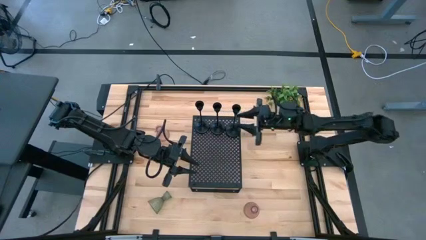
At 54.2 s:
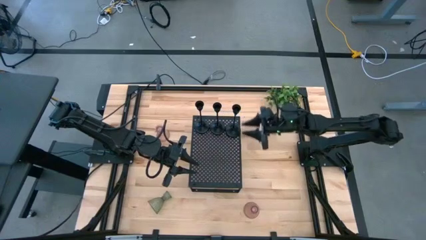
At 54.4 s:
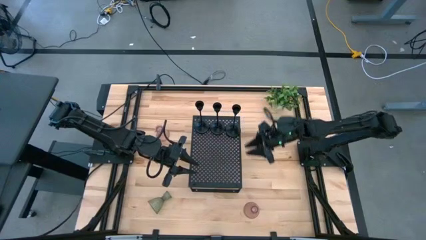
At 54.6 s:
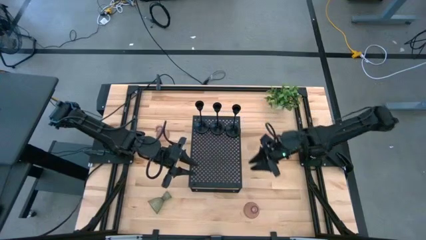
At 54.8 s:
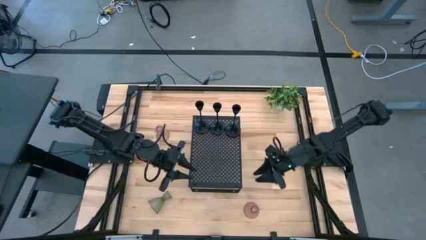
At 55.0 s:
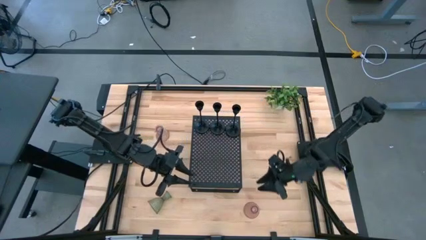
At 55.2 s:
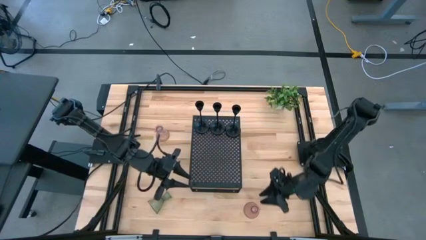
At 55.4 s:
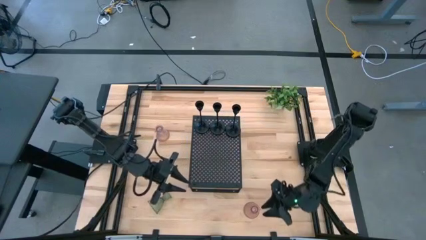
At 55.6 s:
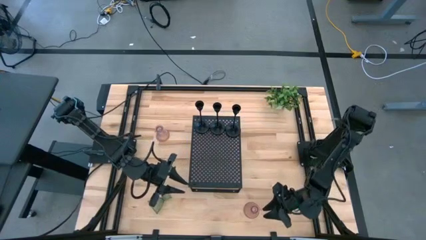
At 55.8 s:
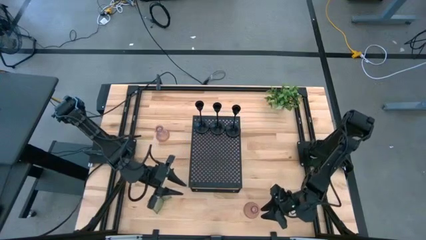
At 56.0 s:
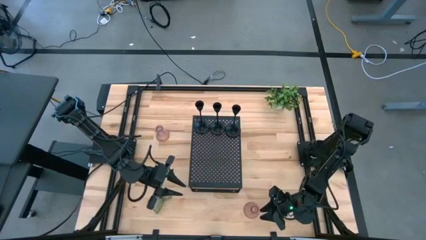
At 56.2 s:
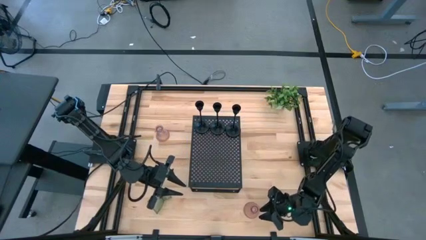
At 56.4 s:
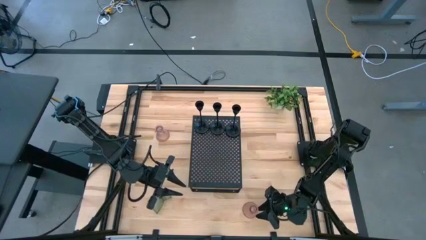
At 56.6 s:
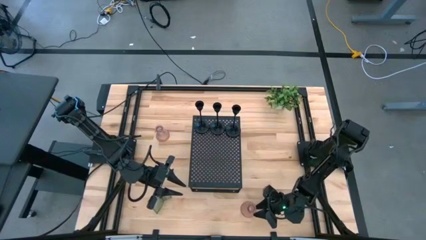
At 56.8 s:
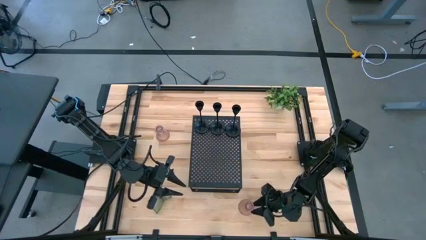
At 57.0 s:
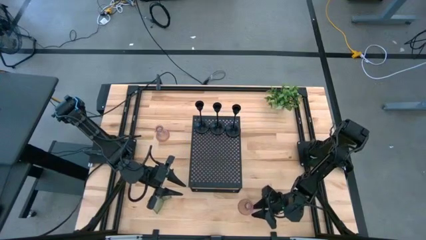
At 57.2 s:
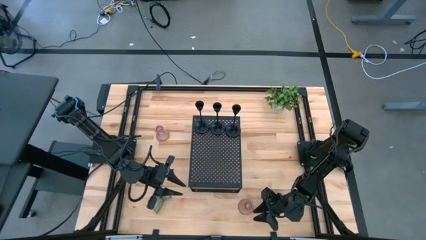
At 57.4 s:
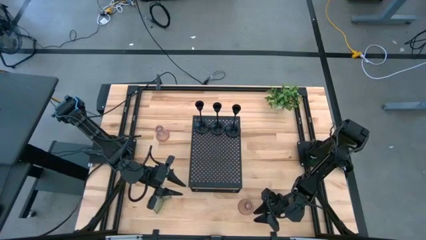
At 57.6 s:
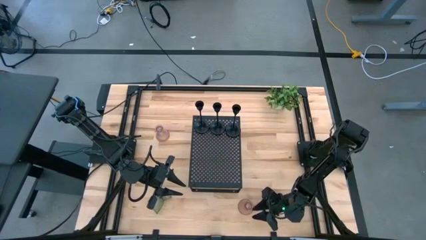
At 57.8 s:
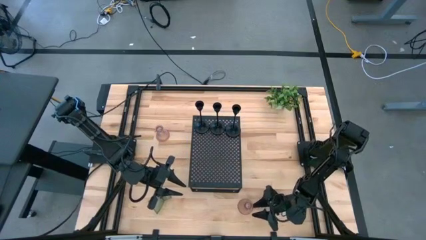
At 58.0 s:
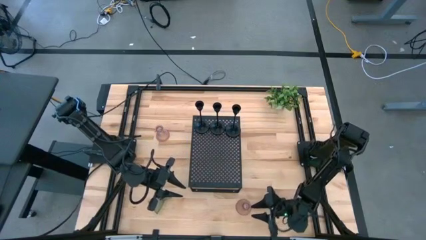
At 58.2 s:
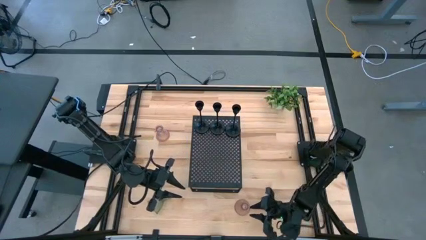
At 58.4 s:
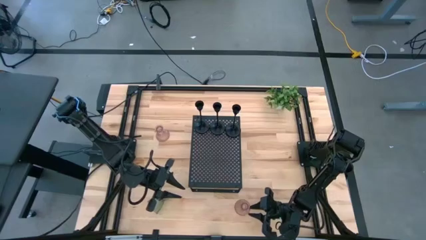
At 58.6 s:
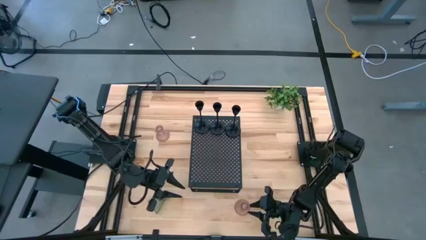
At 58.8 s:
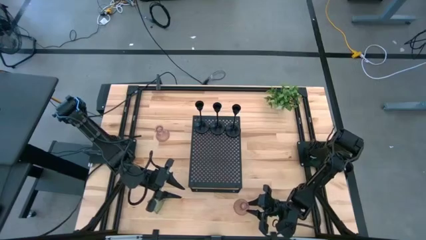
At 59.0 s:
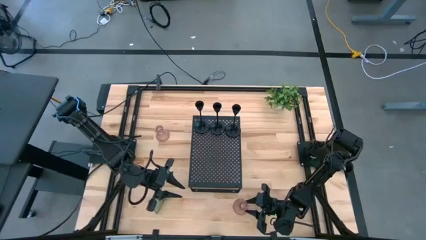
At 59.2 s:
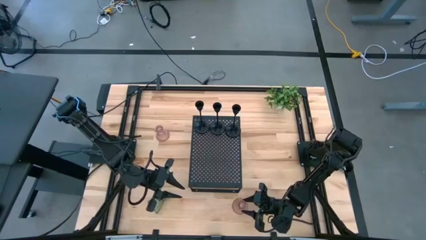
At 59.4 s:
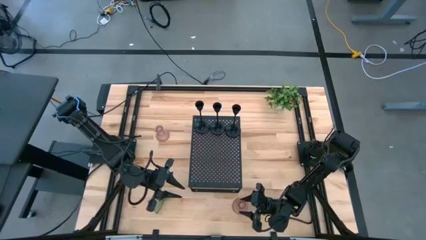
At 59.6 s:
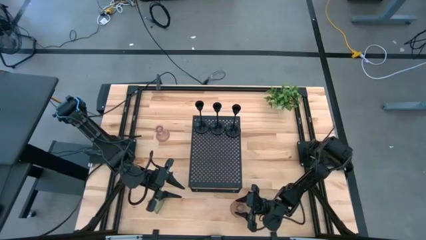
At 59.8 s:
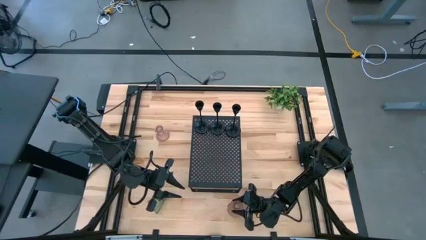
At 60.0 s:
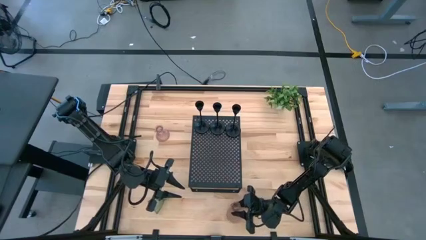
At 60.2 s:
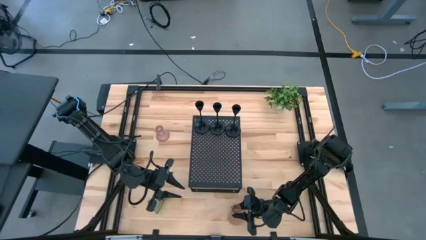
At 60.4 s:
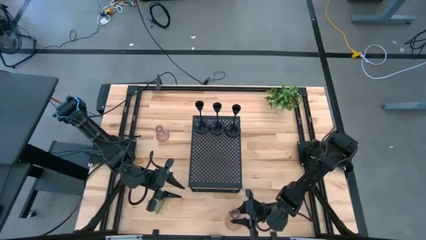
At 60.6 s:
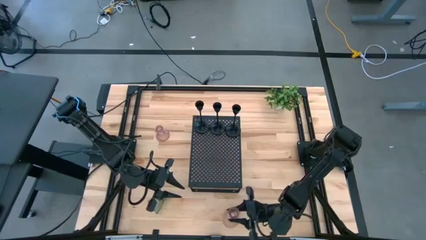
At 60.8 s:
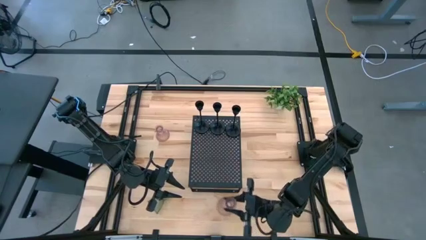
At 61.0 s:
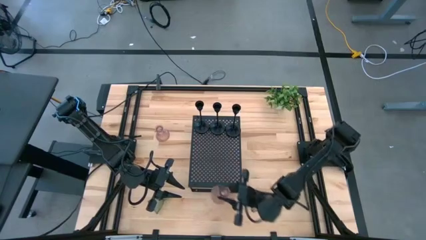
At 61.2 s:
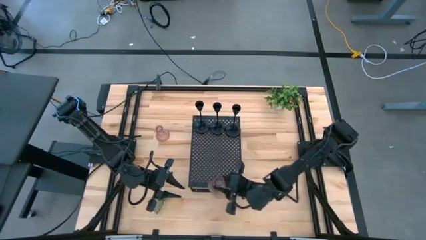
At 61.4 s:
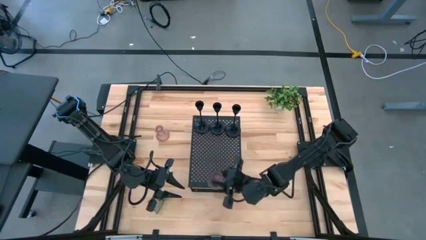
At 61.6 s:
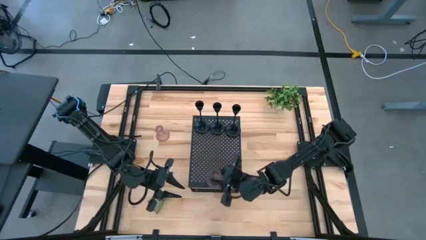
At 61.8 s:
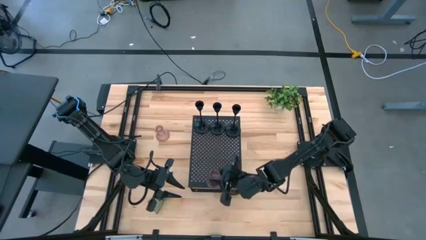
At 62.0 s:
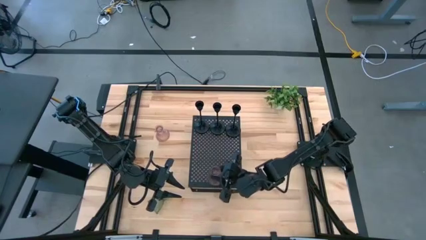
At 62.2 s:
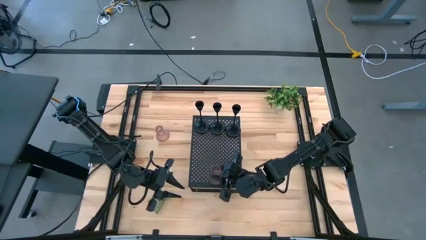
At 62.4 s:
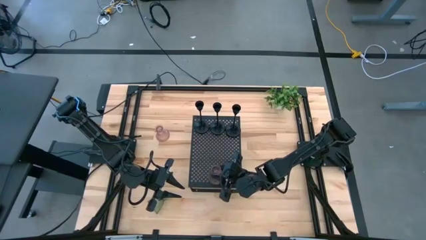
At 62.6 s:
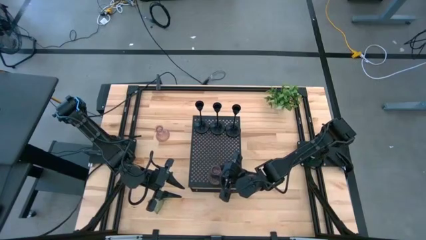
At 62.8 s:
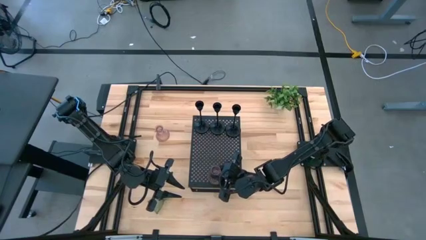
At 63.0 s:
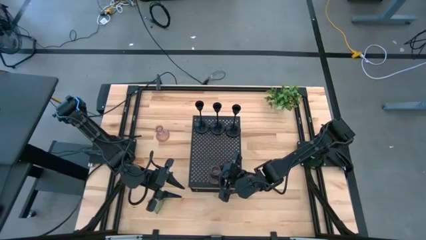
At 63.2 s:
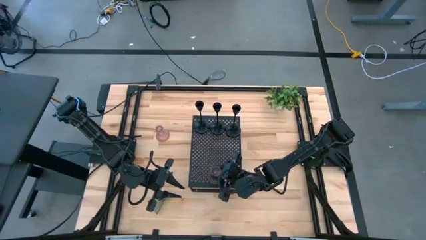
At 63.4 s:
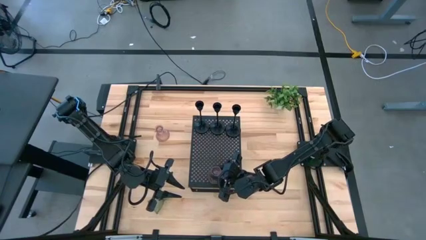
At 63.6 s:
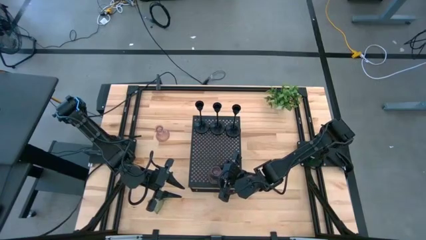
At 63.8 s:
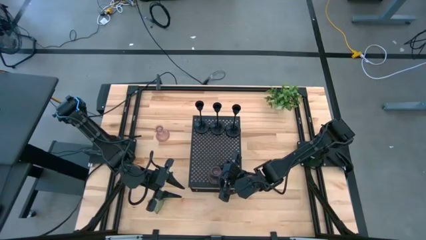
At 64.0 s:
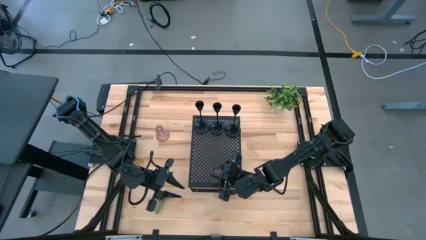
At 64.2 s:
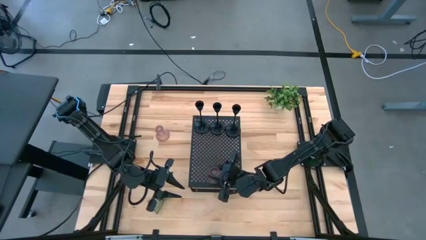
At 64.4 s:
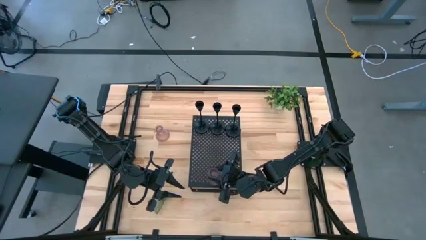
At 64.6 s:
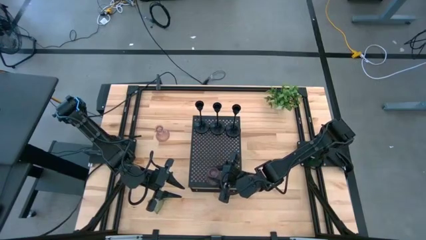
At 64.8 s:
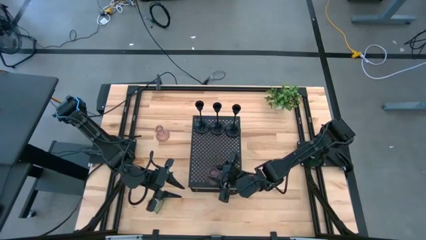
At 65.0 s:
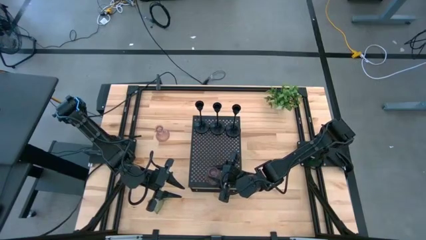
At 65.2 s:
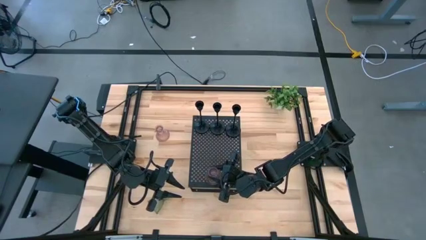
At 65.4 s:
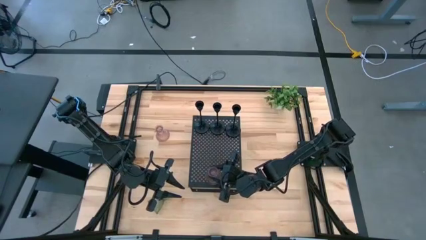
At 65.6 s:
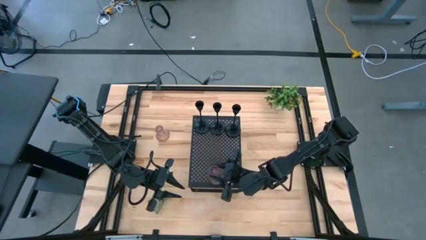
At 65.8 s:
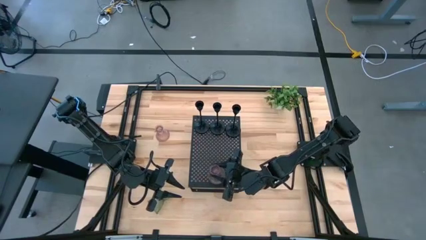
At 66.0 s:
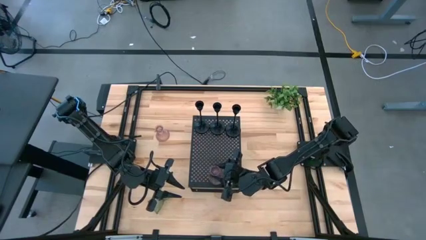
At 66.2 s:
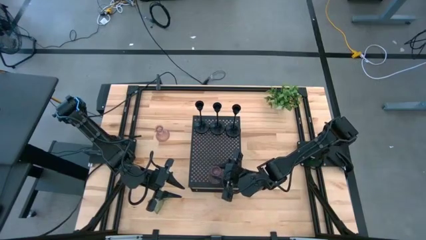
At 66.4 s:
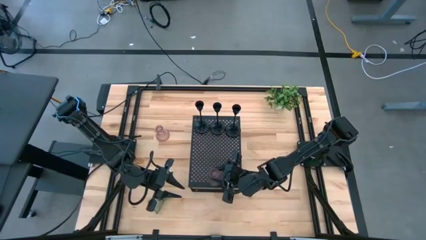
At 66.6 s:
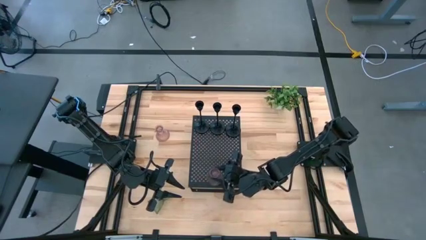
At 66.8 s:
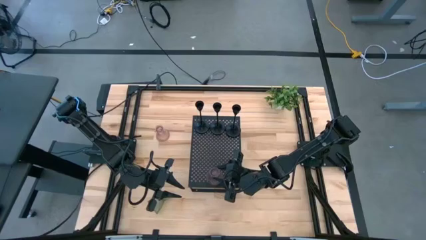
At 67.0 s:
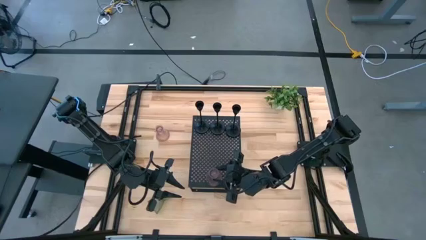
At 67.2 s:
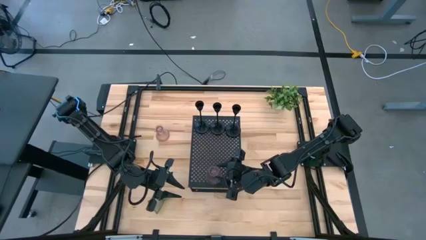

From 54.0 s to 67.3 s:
Task: Pick & Place candle stick holders
Put the bottom pink candle holder on the shelf

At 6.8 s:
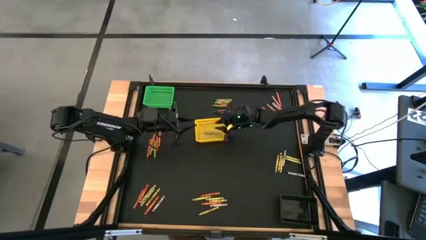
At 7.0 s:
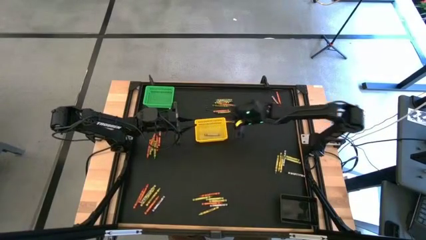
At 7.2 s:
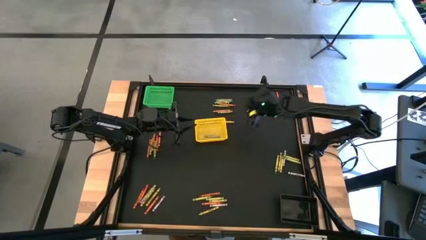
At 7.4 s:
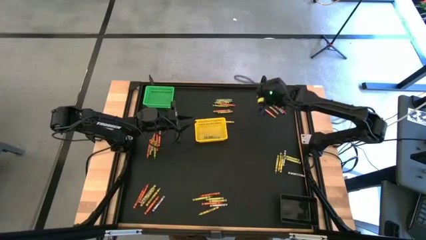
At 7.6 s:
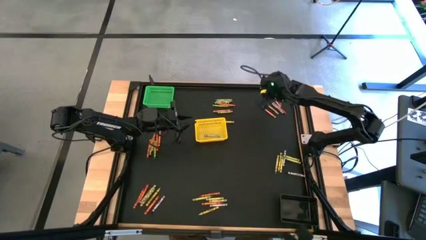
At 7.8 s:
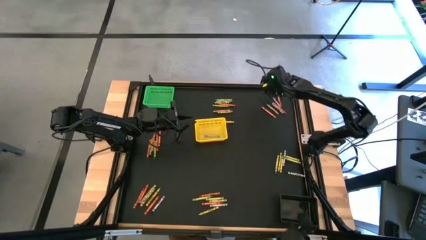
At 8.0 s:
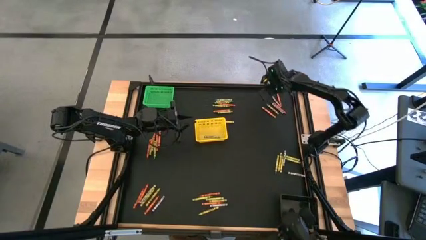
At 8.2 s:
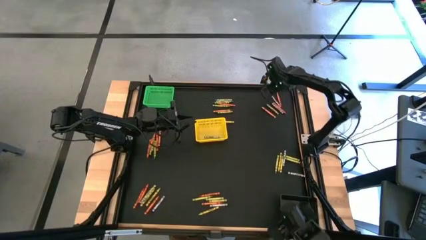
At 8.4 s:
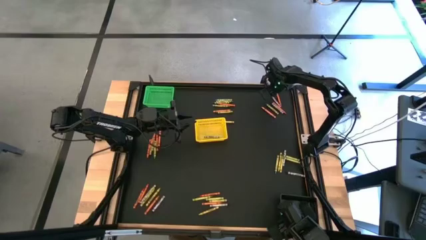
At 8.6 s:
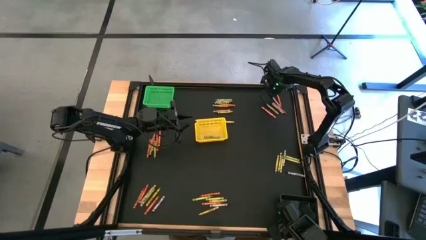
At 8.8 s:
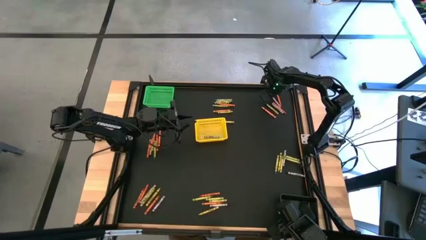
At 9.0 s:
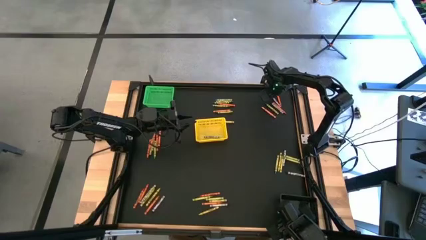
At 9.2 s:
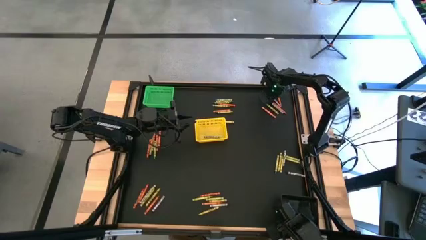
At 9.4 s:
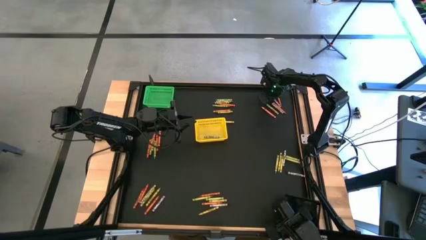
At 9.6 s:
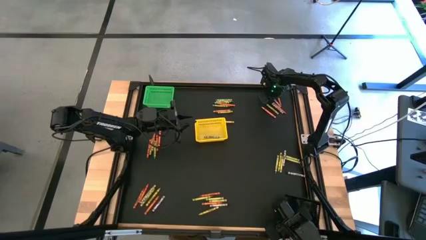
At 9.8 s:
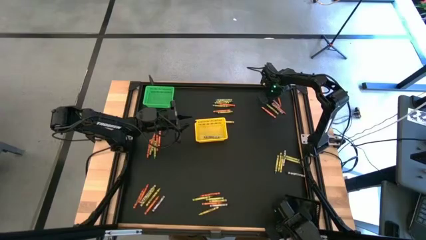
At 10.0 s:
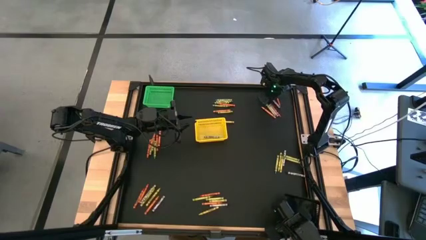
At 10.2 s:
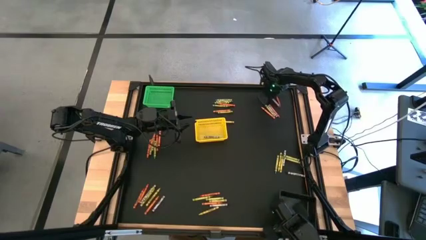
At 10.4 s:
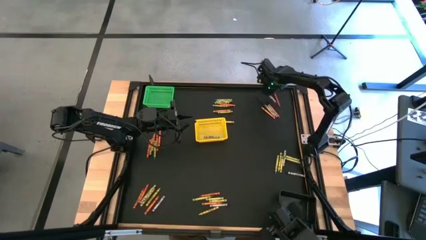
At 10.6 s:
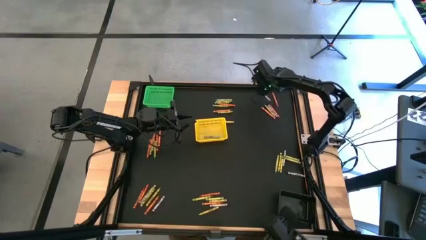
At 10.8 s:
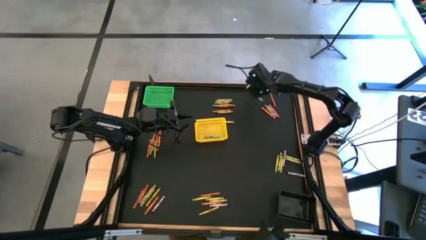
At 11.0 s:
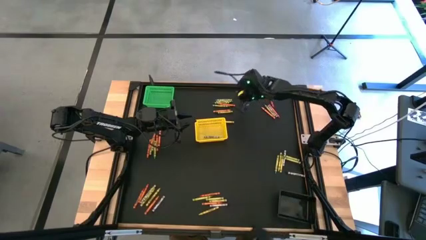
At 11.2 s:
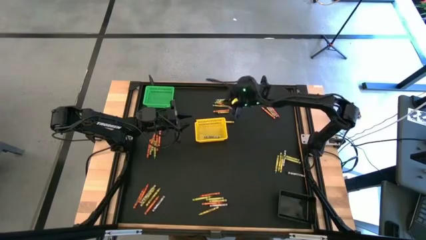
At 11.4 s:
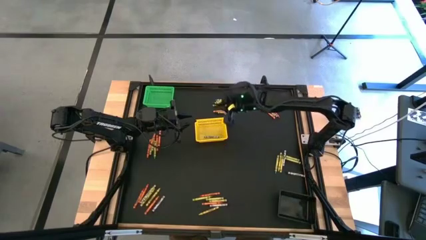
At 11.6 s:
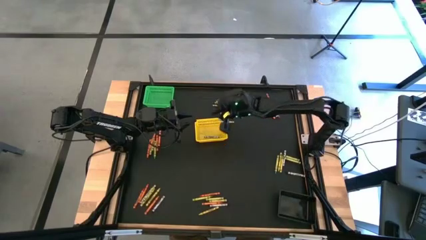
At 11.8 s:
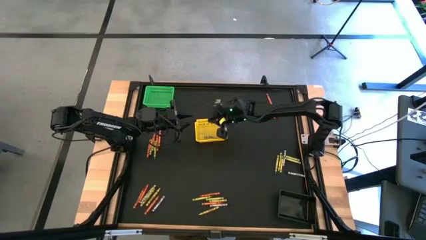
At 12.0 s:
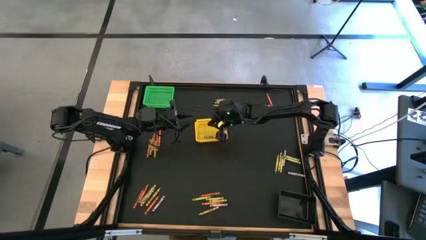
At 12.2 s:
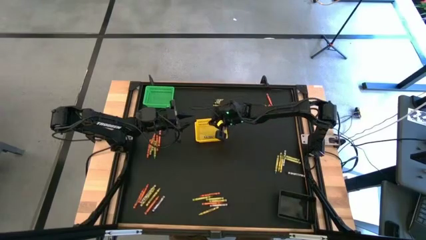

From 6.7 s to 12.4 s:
Task: Sort crayons
Put the black crayon into the yellow bin
